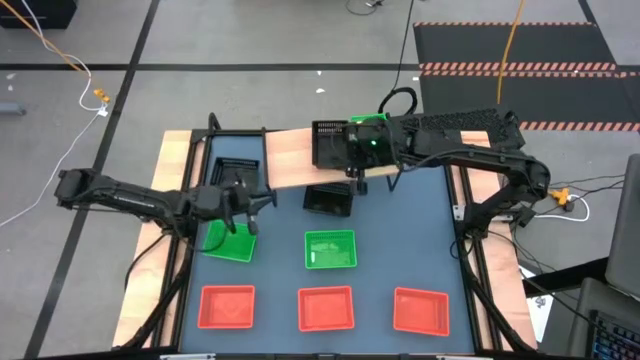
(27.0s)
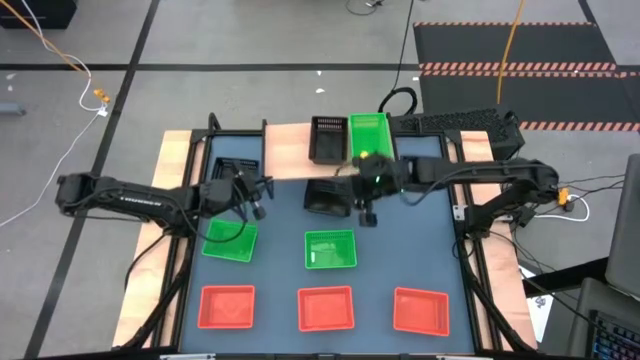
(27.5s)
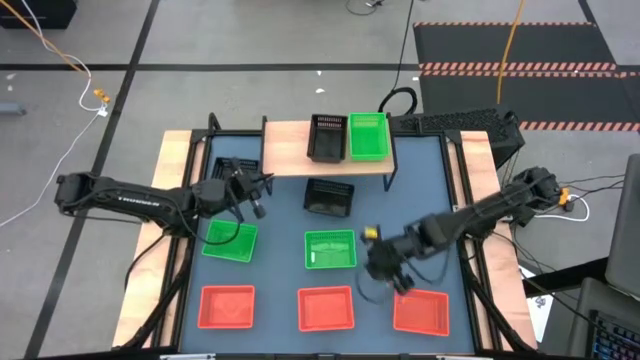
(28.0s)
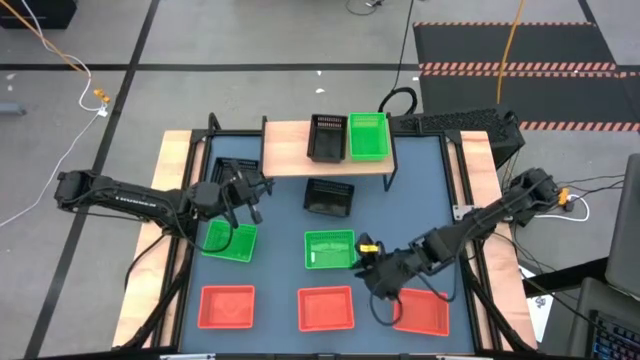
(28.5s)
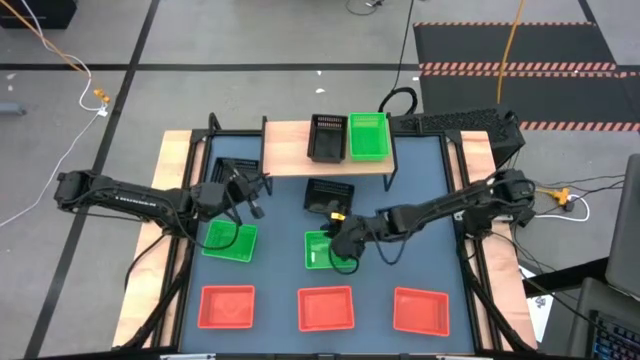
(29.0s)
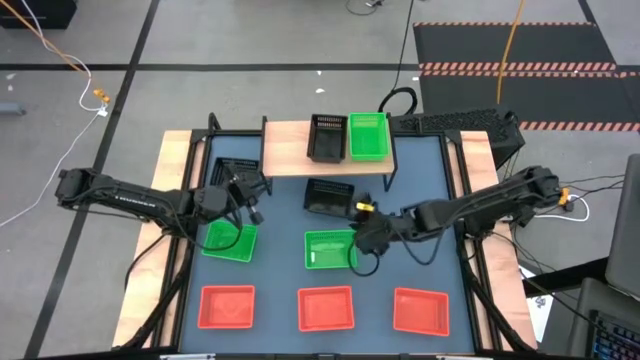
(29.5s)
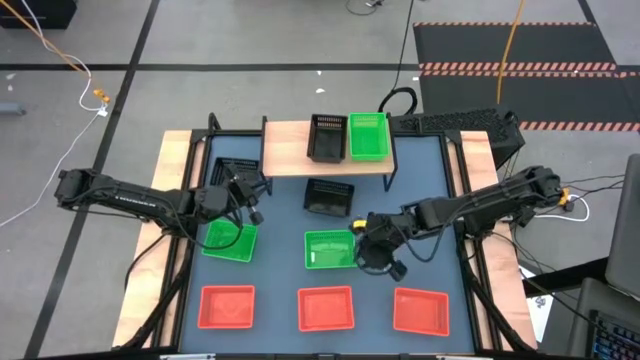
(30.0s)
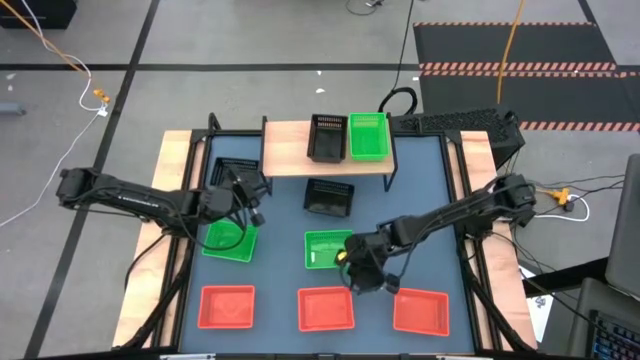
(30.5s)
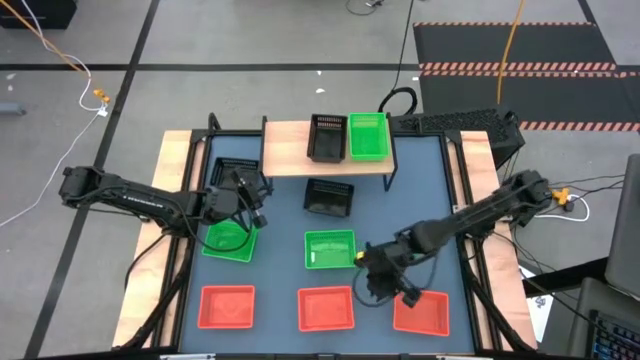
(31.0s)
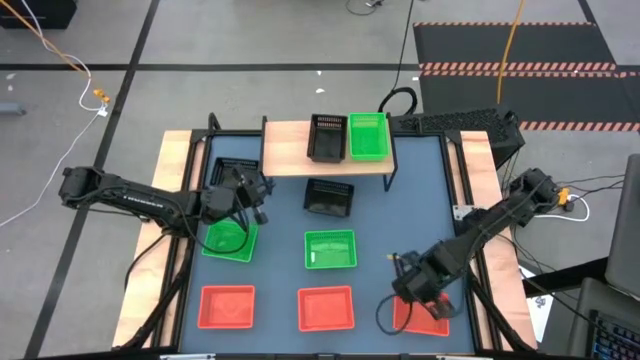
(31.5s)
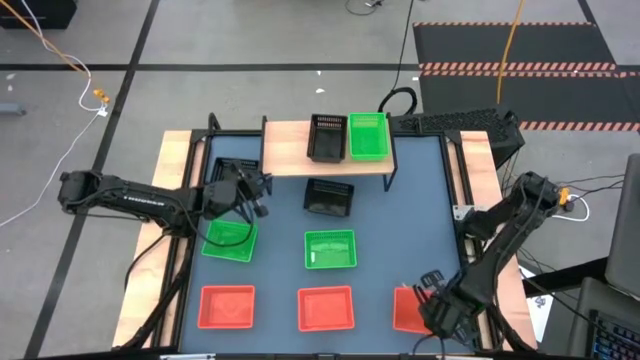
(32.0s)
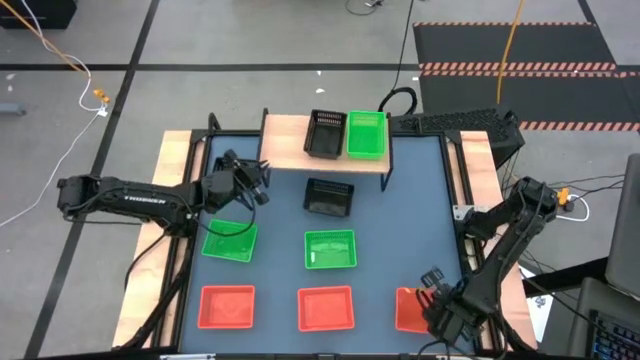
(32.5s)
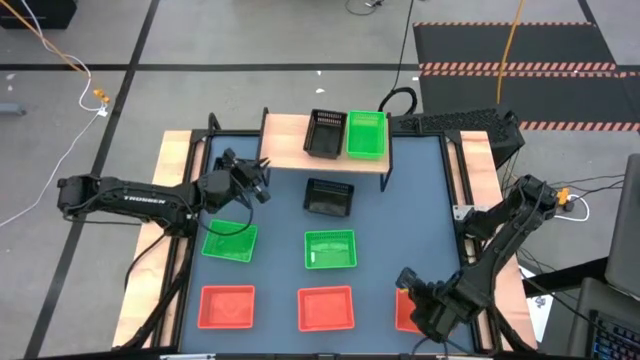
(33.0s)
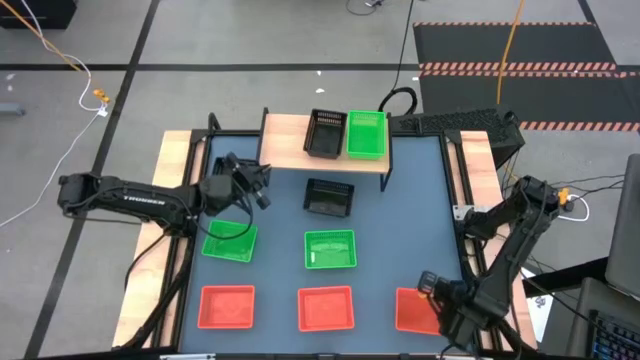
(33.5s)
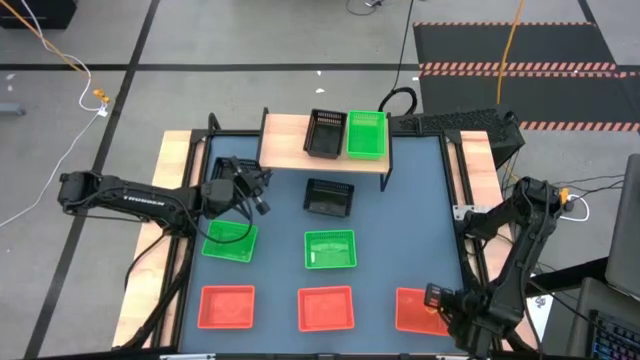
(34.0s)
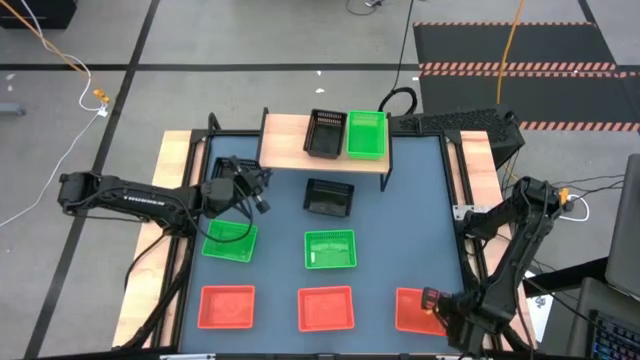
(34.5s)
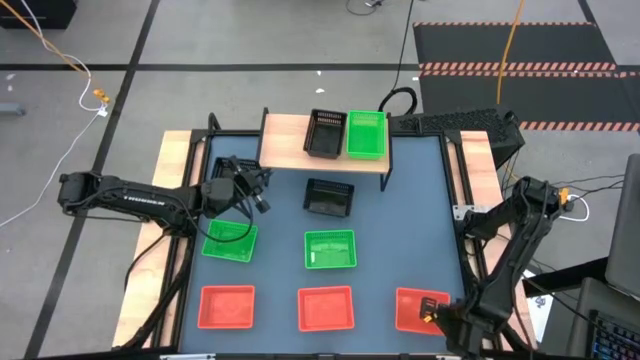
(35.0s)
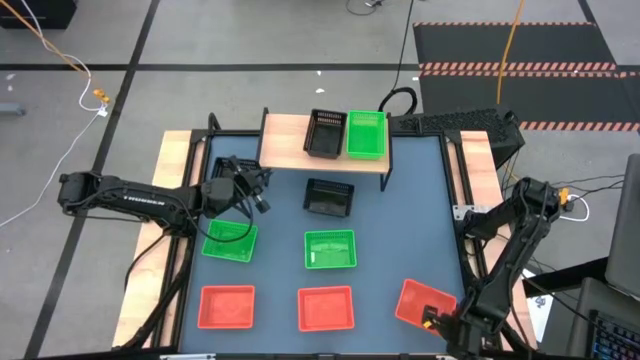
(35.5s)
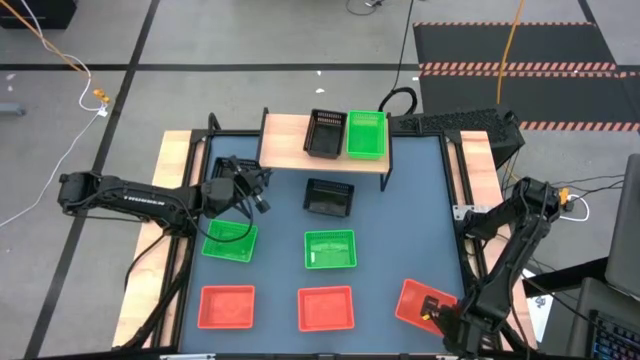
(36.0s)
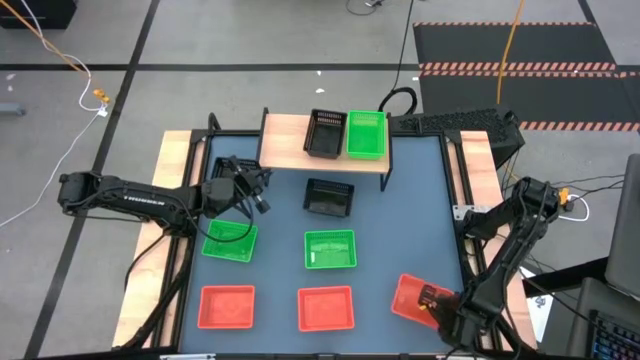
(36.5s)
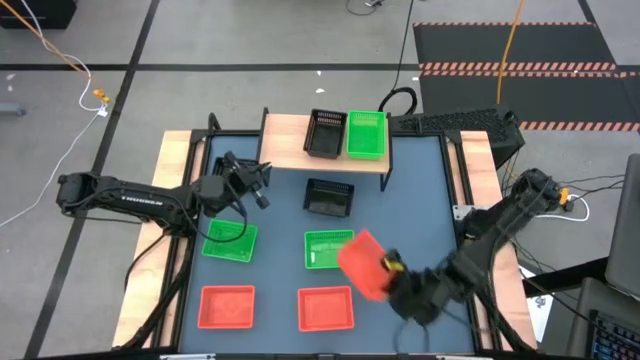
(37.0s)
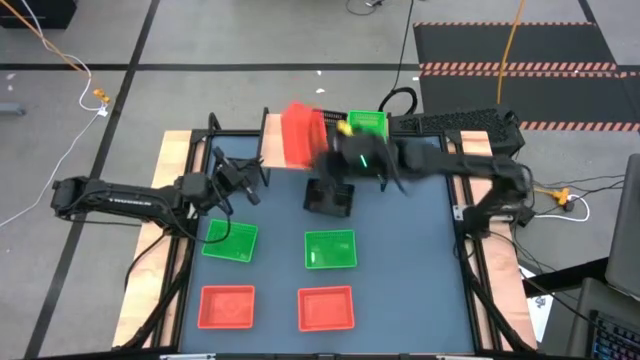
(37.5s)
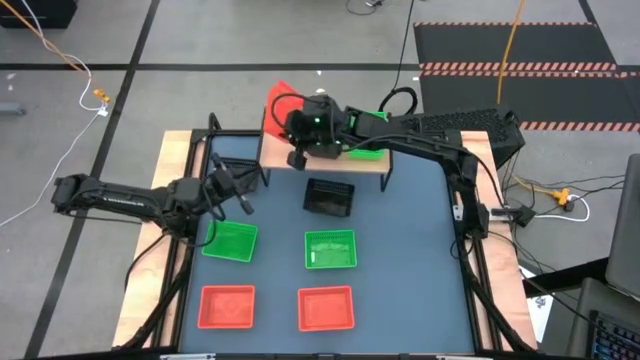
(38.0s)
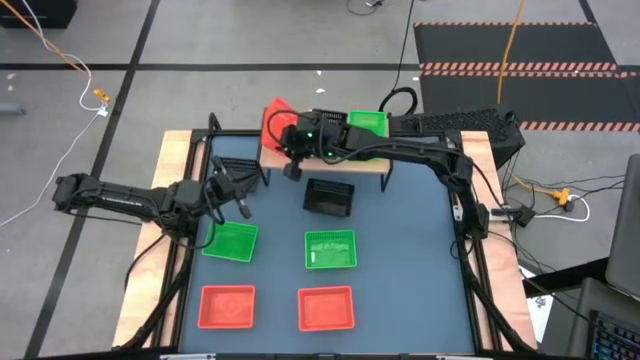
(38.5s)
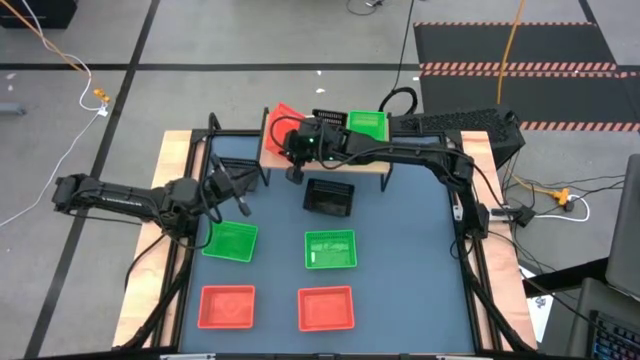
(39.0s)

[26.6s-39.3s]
Task: Stack baskets on shelf by color
Put the bottom right orange bin on the shelf

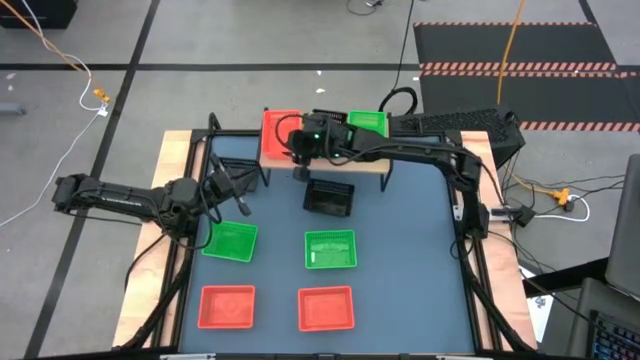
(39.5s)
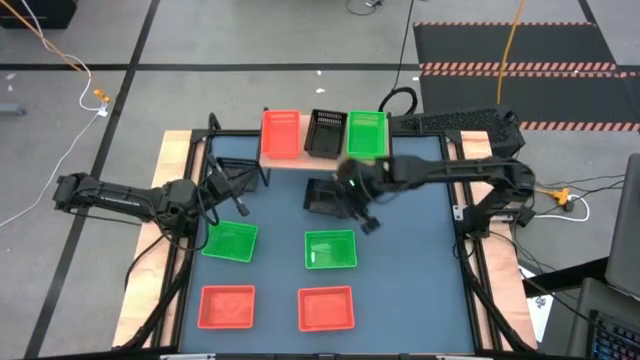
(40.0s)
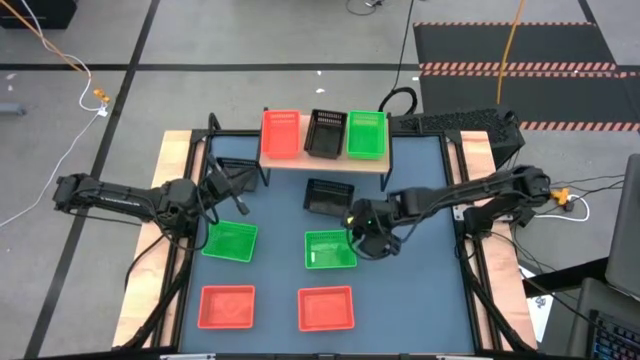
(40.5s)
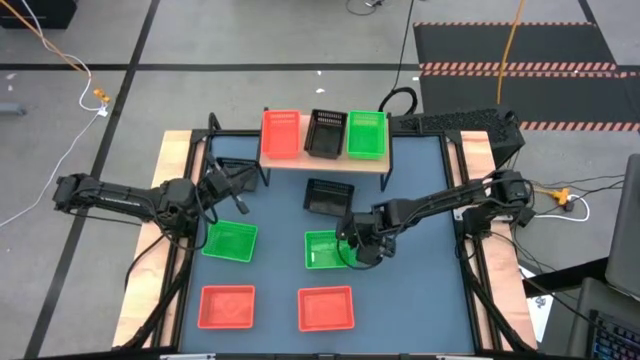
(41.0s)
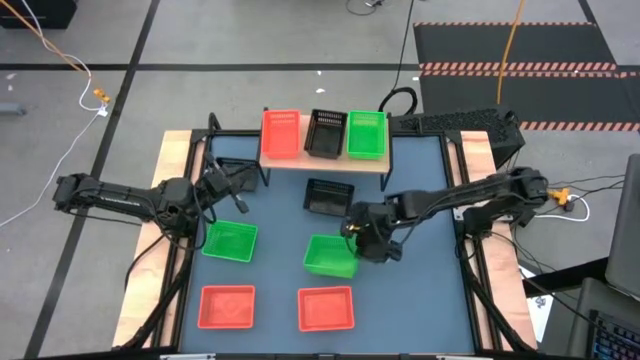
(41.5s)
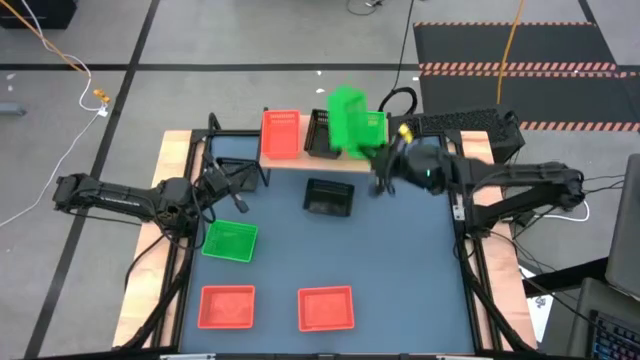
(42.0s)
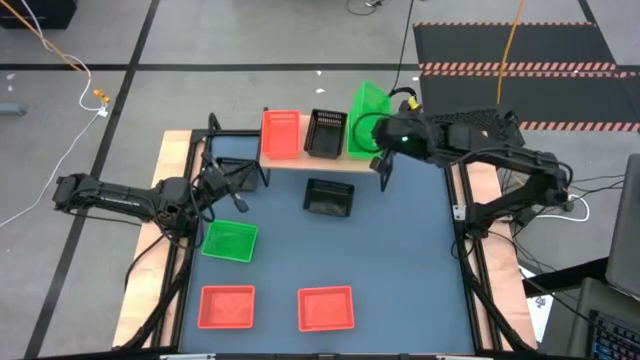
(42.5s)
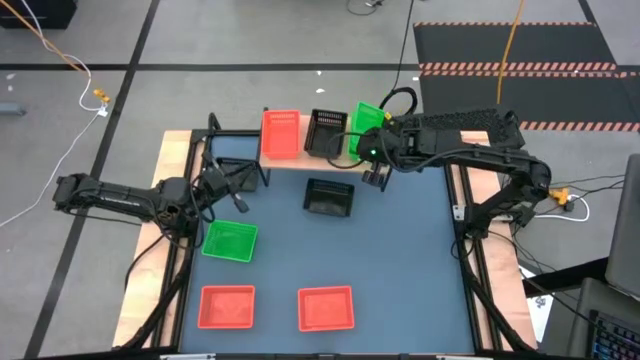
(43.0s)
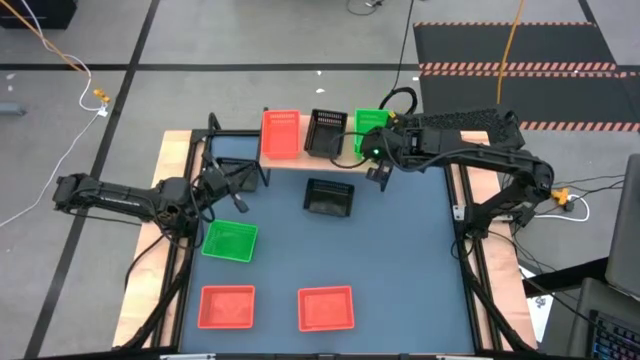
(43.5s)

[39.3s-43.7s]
Stack the right green bin on top of the green bin on the shelf

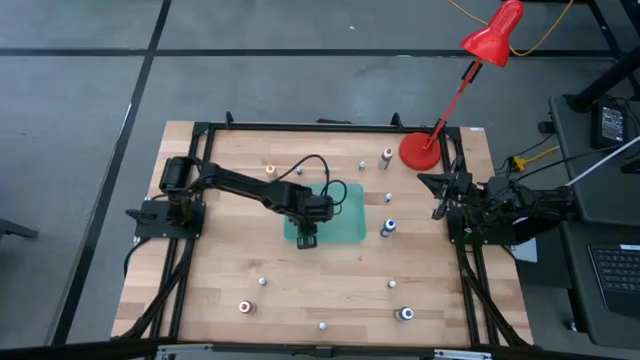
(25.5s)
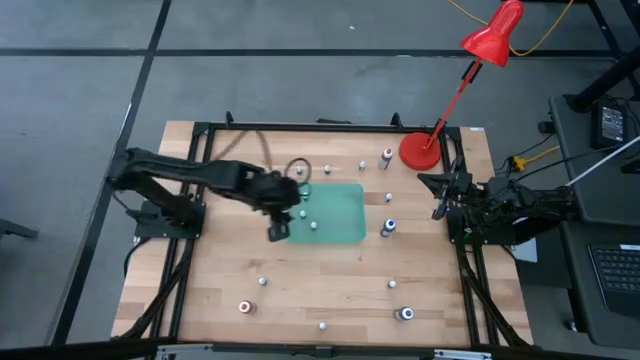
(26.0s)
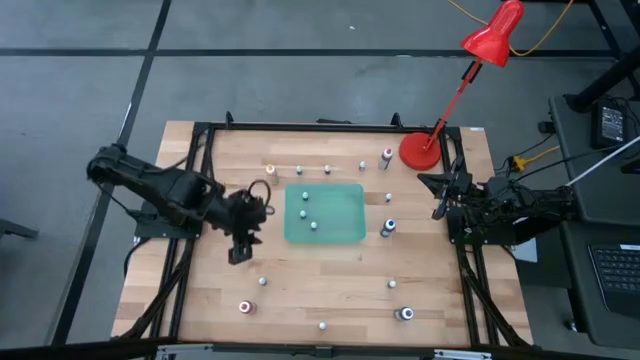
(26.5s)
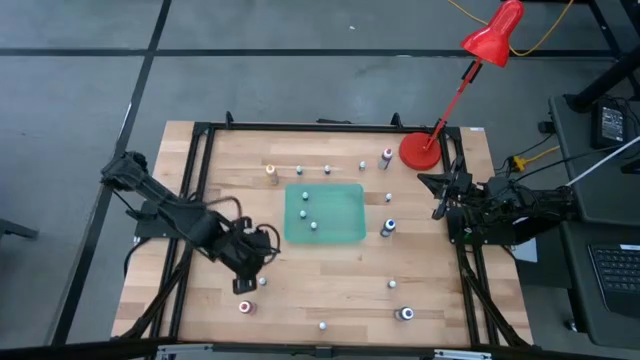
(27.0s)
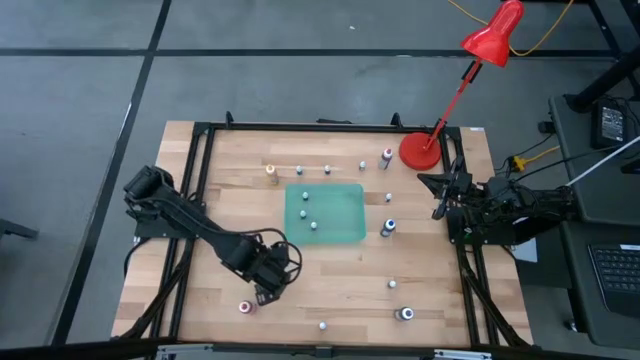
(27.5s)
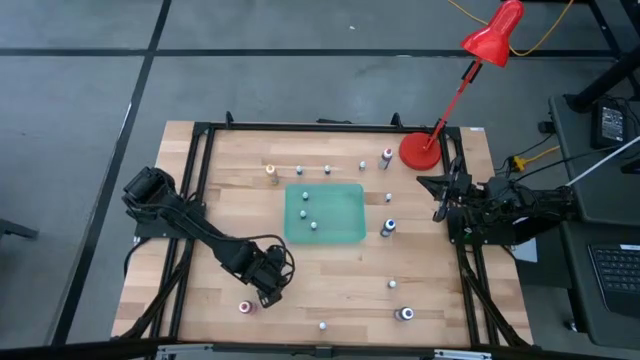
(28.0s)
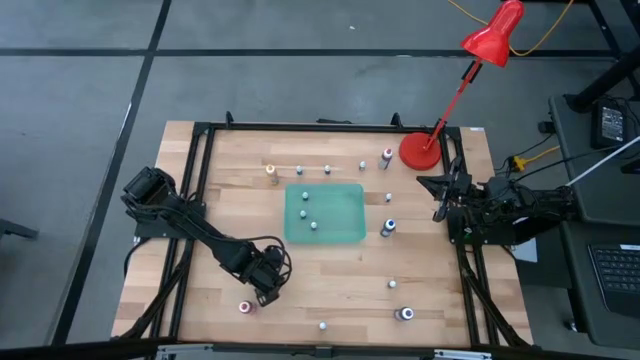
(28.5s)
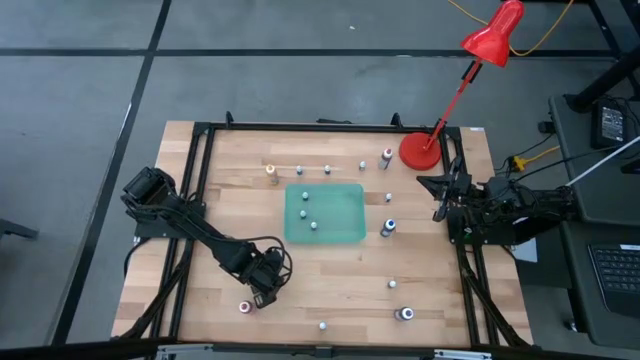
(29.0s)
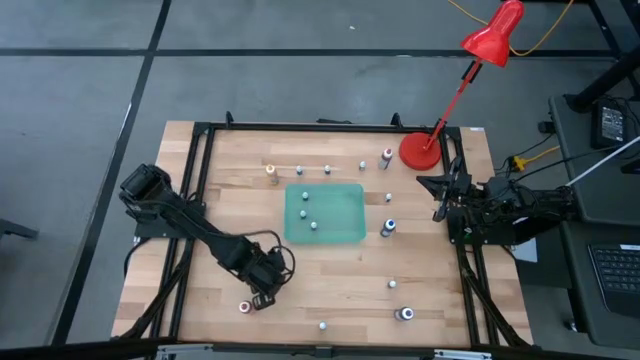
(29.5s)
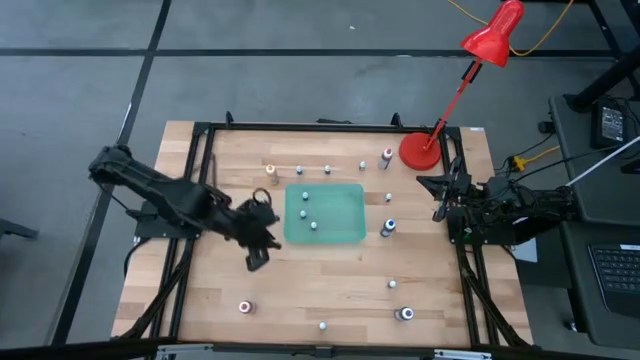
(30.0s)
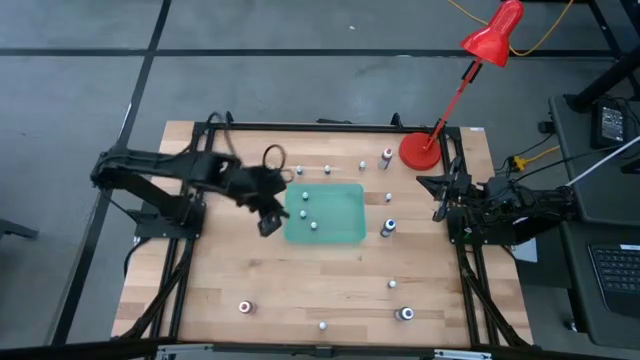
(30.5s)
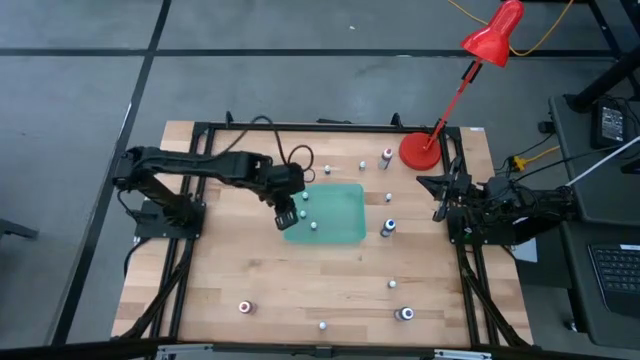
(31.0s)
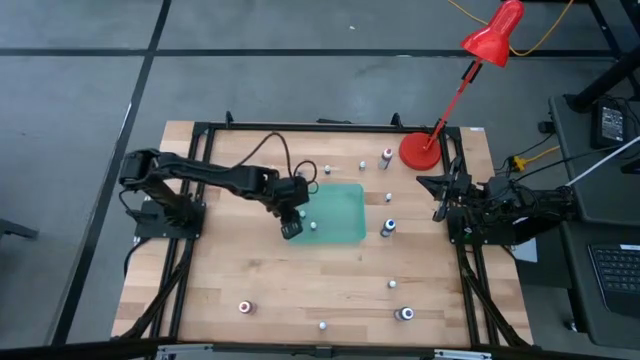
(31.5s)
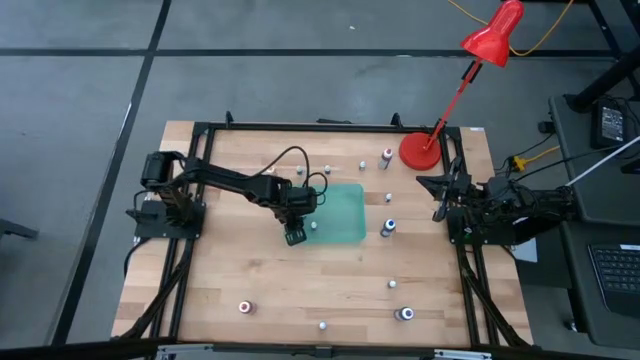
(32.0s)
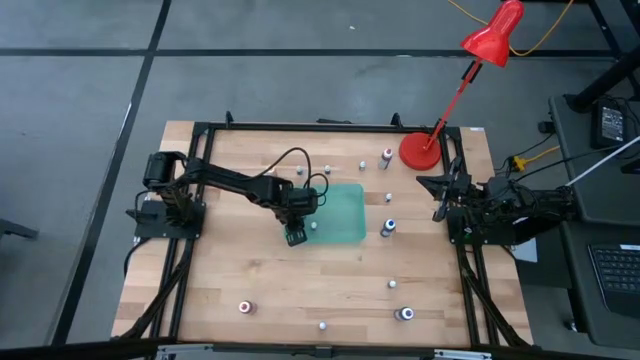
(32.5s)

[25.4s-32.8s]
Task: Pick & Place food coloring
Put the small green food coloring bottle into the green bin
